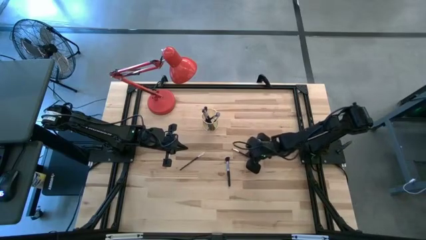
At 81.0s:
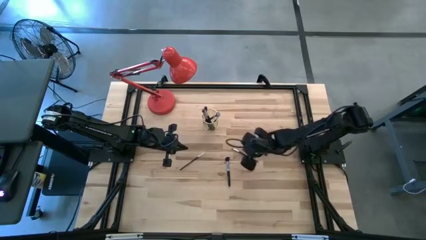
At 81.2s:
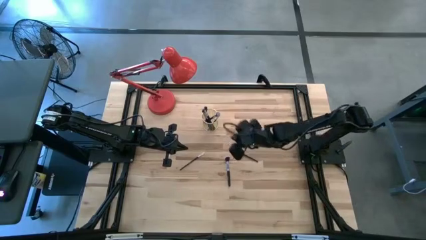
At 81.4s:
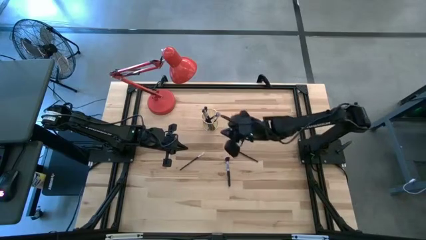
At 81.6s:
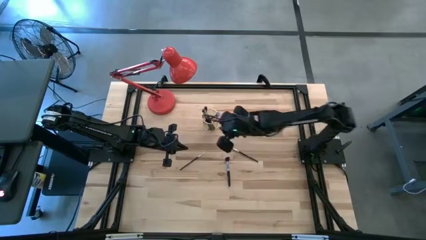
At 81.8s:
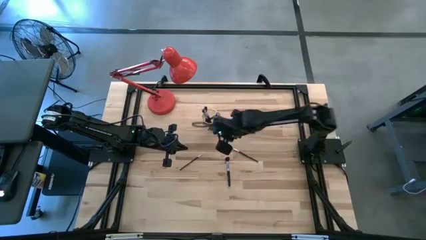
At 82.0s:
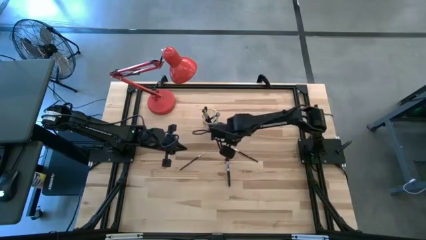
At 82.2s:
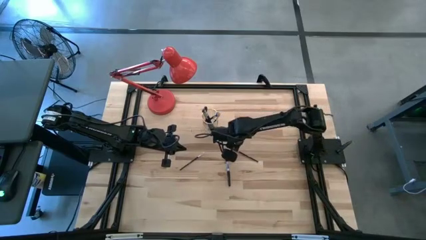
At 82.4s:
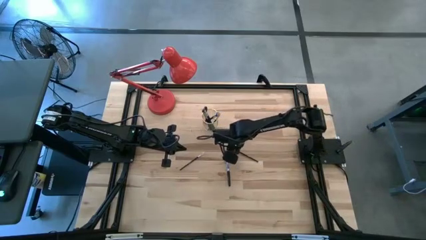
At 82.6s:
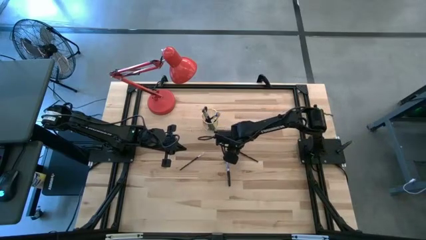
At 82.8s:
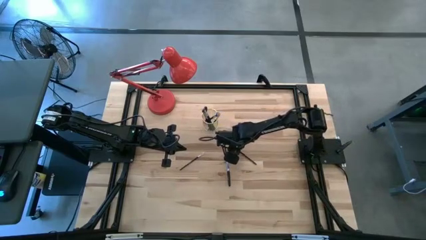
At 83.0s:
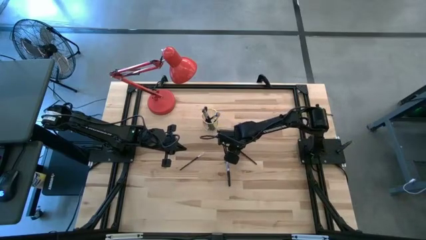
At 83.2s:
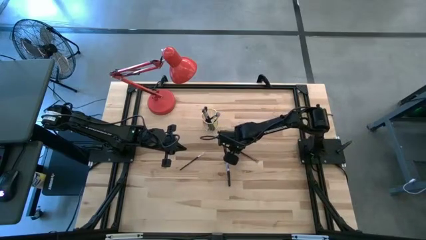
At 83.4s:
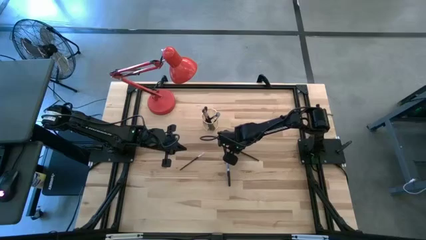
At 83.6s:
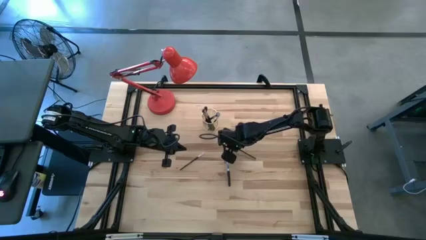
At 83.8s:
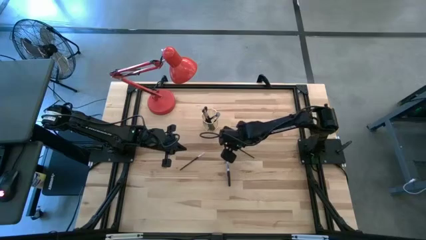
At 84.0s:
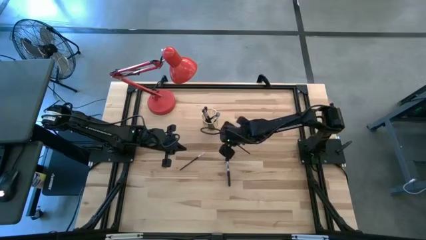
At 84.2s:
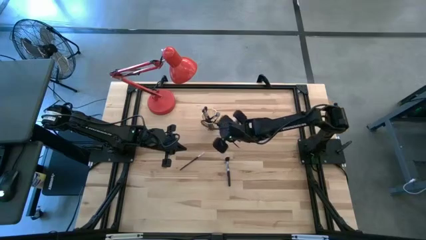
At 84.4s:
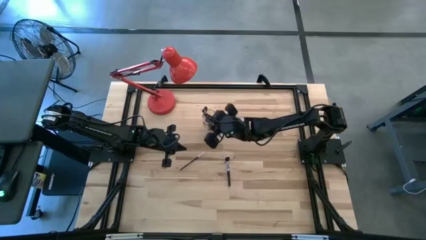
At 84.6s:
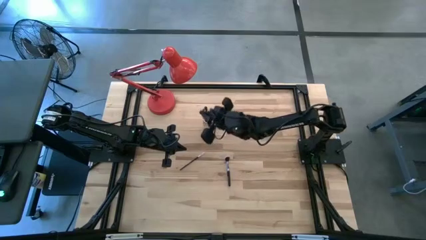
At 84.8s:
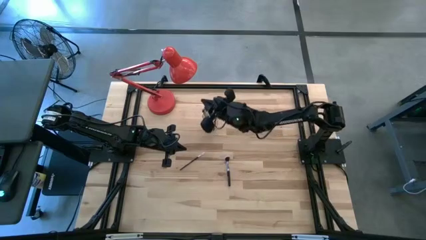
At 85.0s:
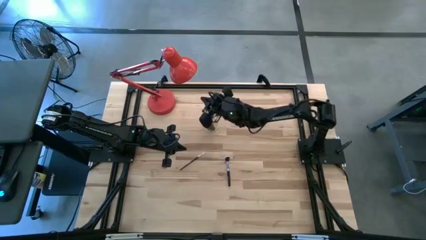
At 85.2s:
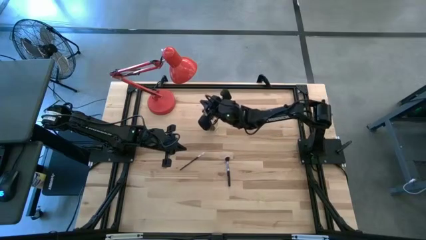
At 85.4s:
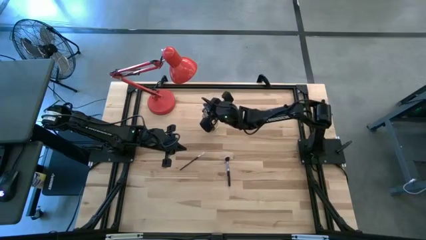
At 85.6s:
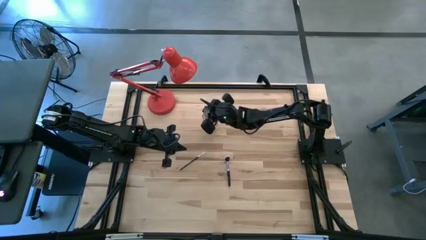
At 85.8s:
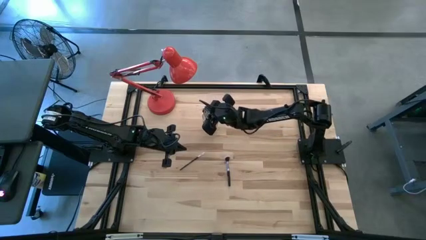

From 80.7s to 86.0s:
Task: Put items in baskets/containers
Put the black eyeshadow brush into the gold pen holder

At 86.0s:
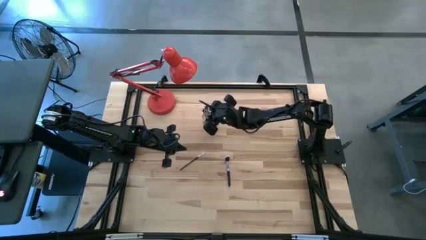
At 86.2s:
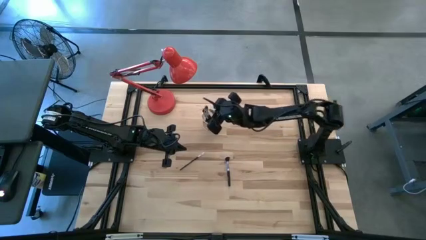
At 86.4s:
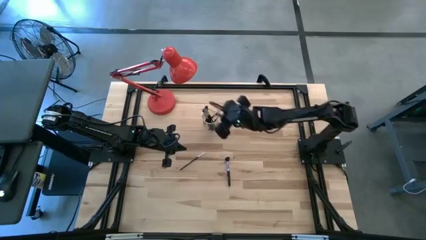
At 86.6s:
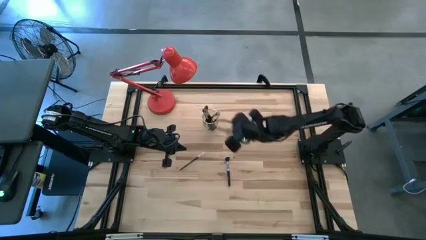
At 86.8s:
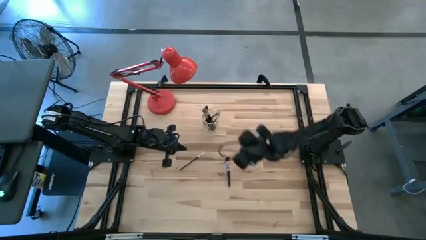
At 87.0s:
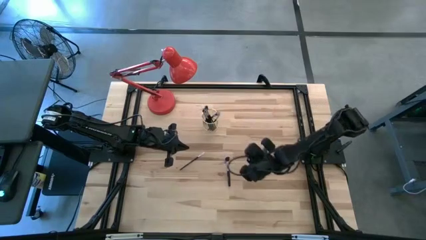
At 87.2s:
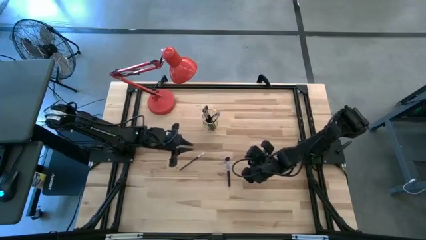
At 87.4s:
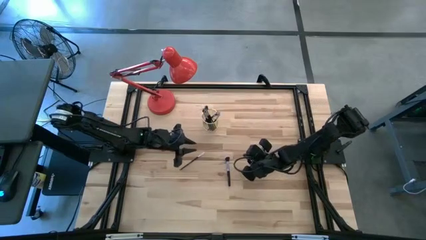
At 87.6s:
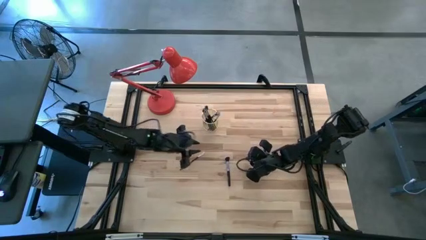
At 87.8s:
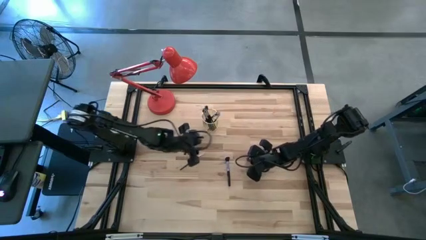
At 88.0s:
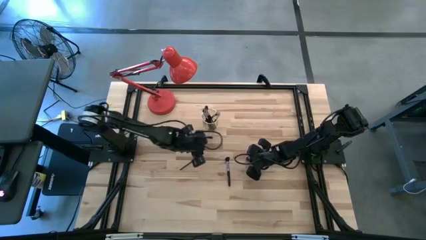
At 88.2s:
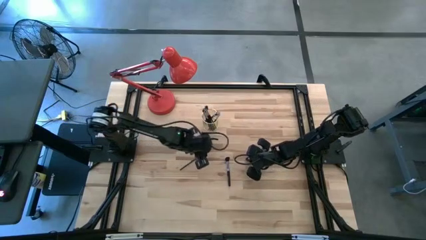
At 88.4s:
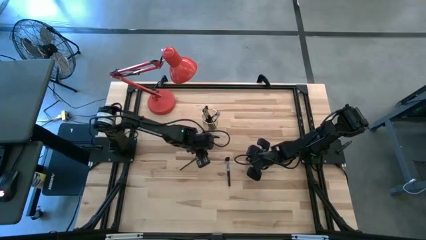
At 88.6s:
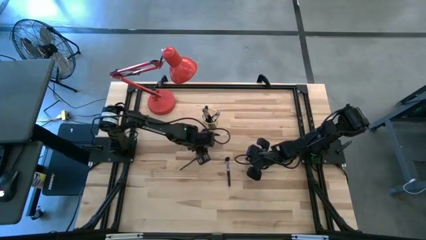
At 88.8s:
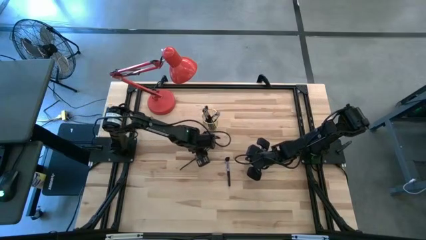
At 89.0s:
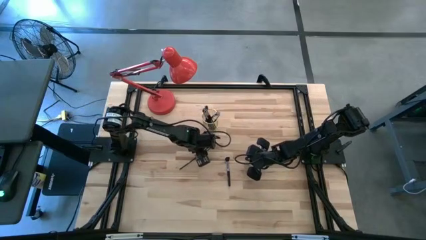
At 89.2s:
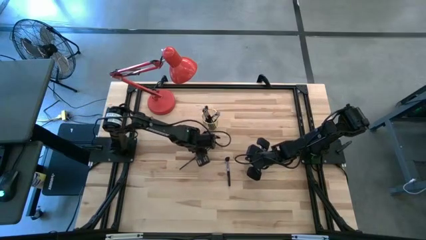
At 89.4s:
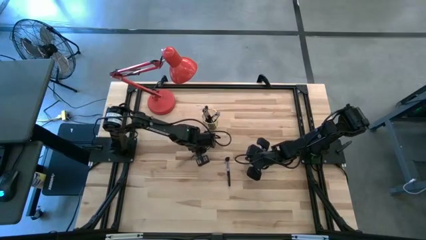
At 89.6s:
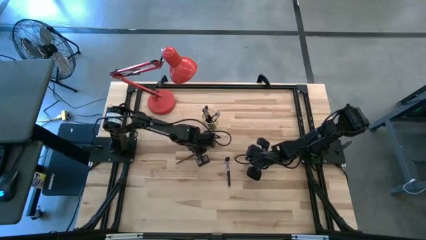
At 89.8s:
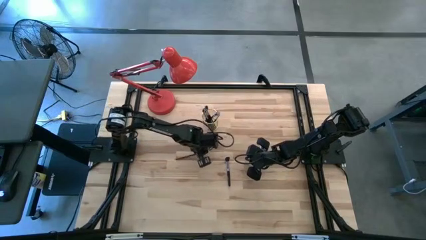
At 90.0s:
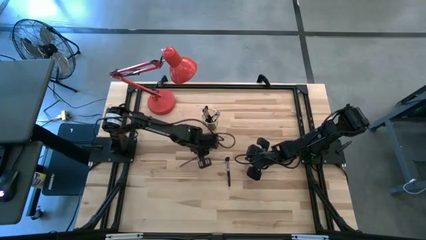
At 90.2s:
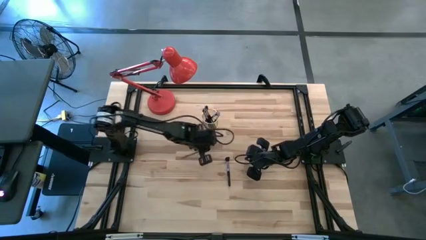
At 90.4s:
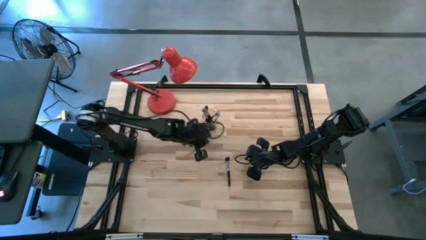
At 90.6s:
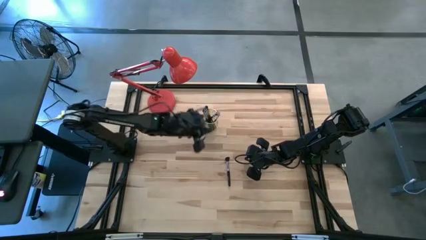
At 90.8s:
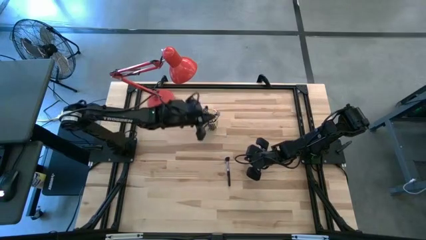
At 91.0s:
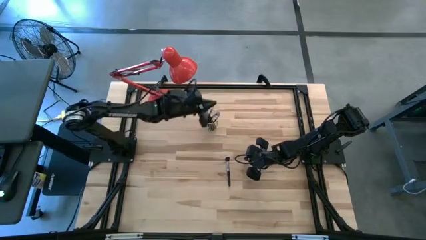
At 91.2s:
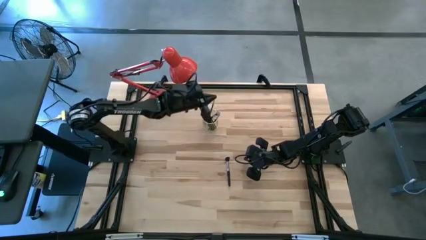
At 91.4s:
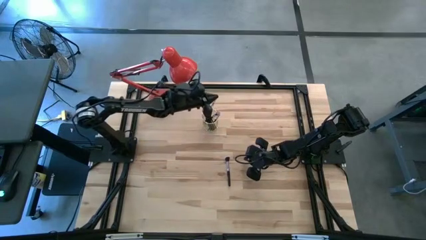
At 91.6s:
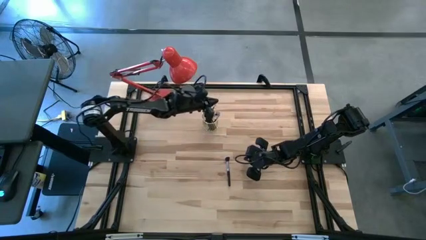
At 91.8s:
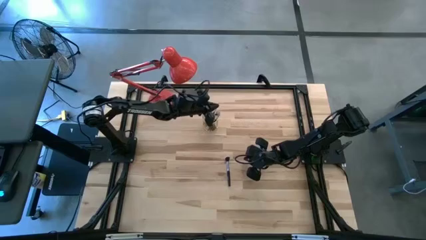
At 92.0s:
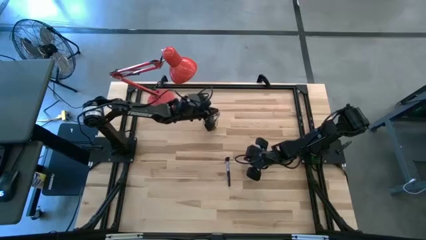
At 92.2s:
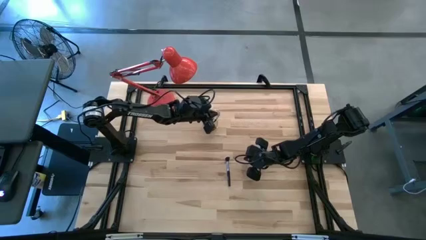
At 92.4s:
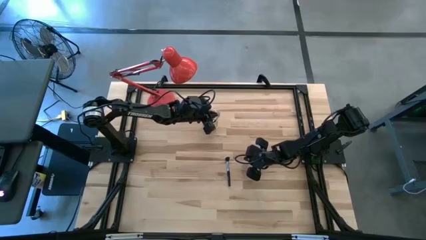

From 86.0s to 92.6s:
Put the white eyeshadow brush into the gold pen holder

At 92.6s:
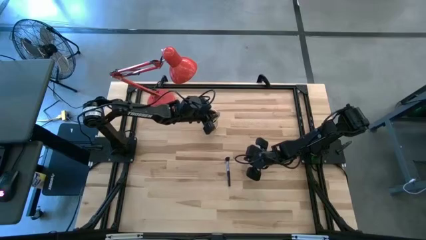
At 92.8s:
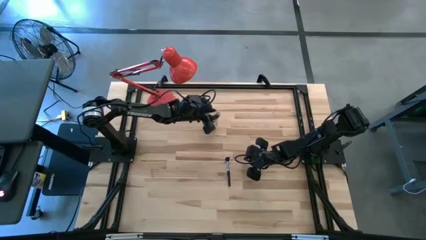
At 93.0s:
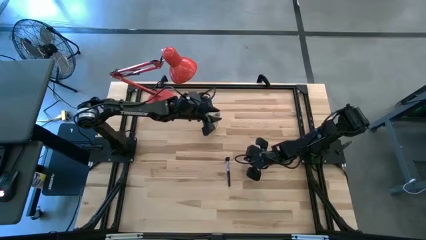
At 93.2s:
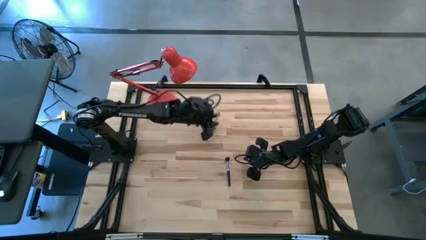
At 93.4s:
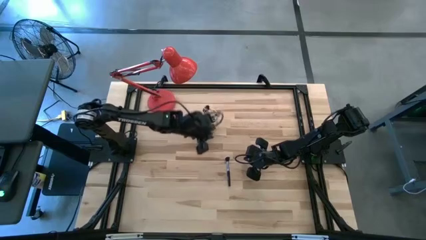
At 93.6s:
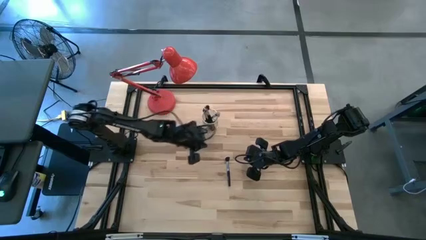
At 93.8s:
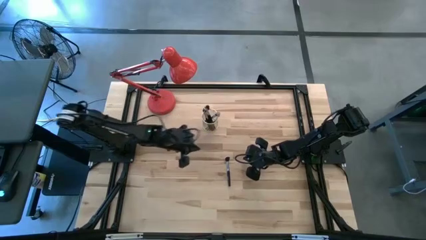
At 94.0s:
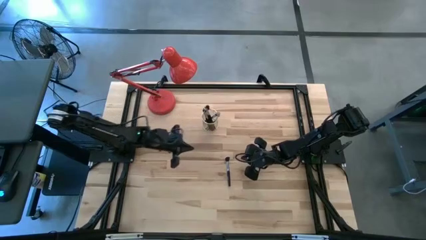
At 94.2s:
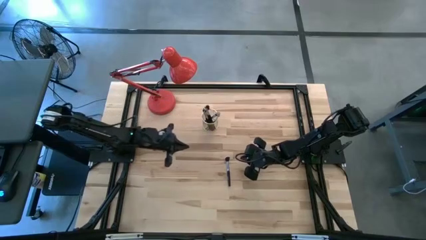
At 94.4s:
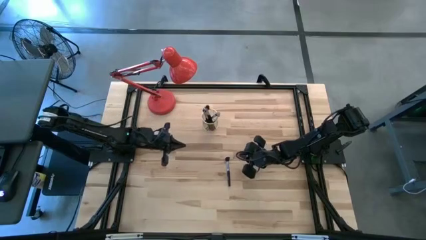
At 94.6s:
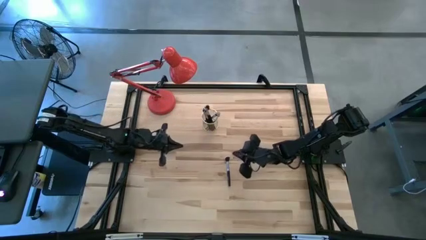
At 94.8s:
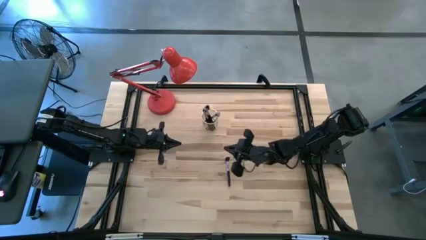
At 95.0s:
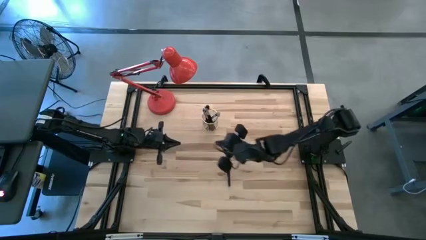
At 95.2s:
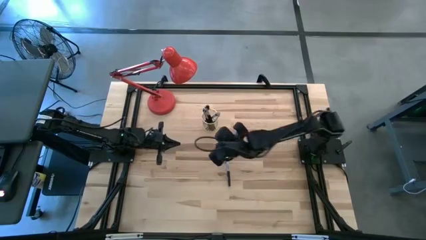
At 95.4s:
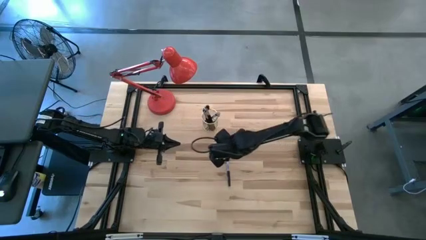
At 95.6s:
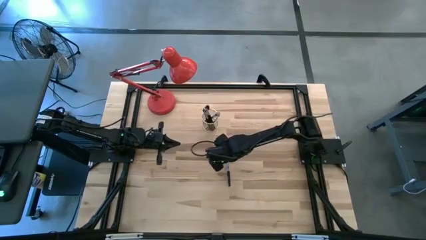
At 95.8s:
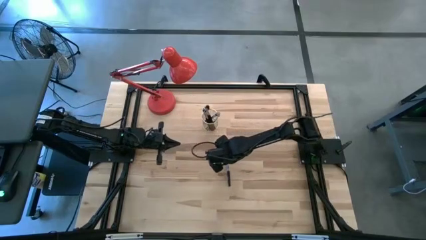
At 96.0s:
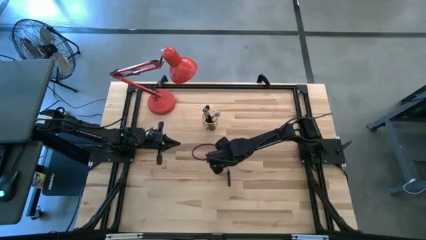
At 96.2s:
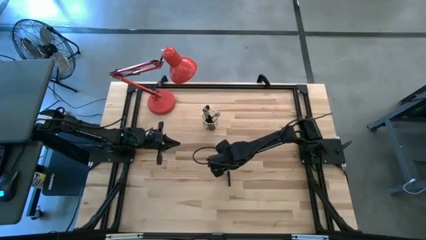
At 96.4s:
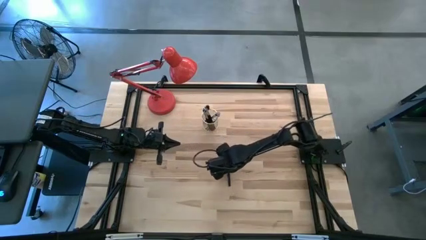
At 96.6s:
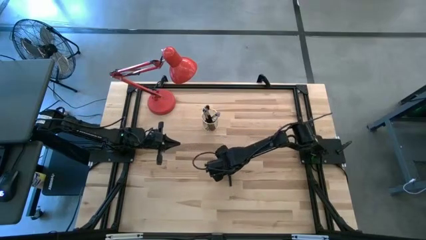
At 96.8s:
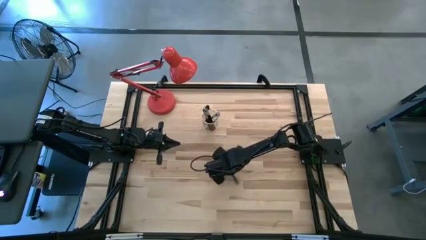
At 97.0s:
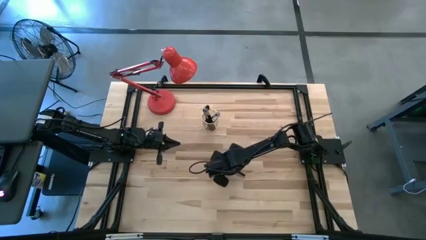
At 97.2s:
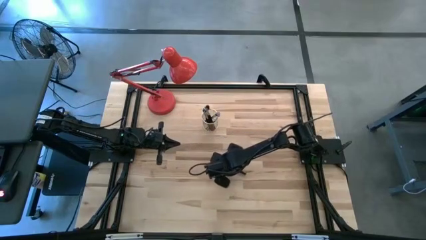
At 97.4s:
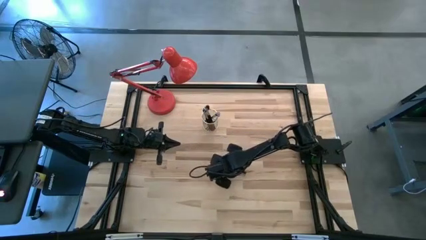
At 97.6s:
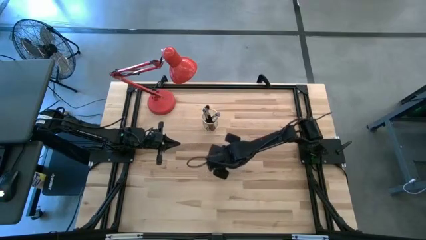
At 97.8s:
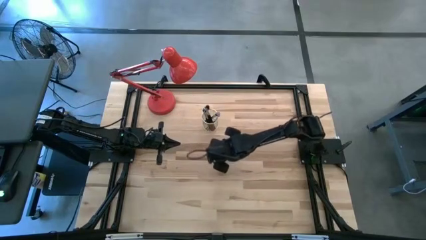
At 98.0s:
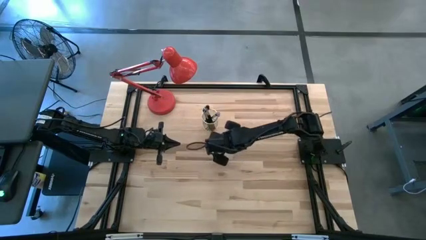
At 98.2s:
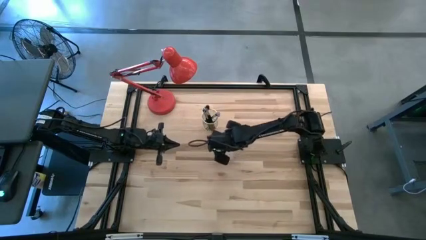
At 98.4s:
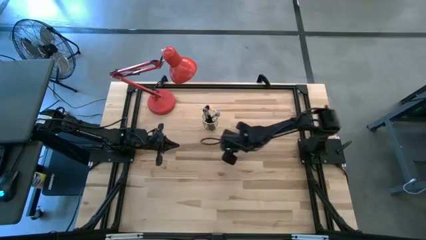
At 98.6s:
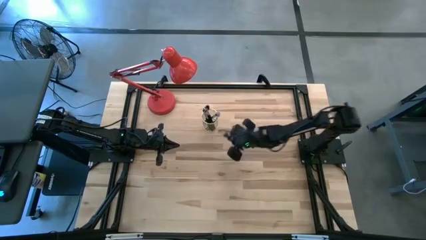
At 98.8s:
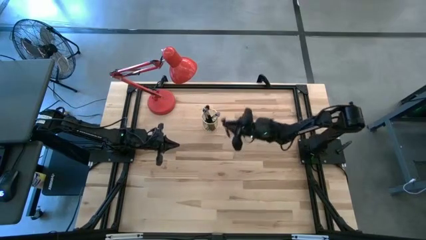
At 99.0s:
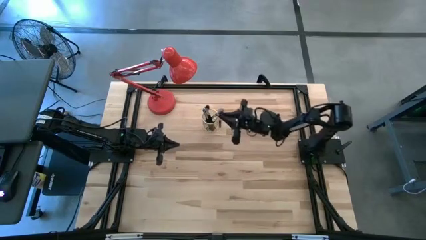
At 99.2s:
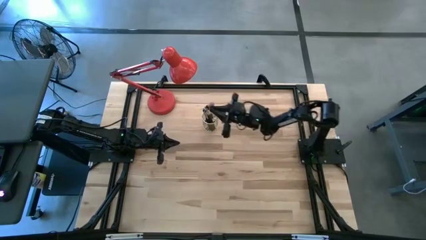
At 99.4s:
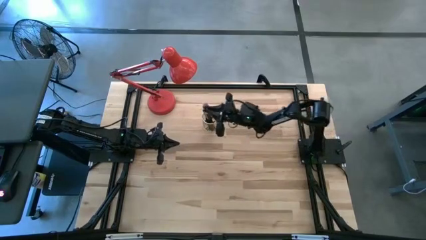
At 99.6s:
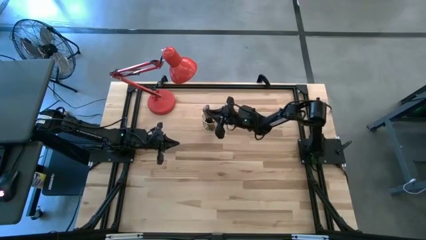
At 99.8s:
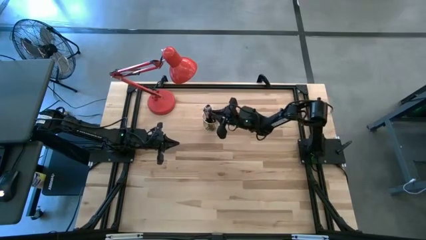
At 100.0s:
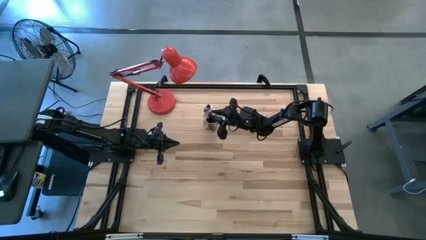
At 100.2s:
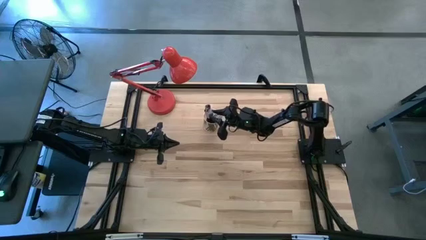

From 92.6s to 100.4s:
Put the black powder brush into the gold pen holder
